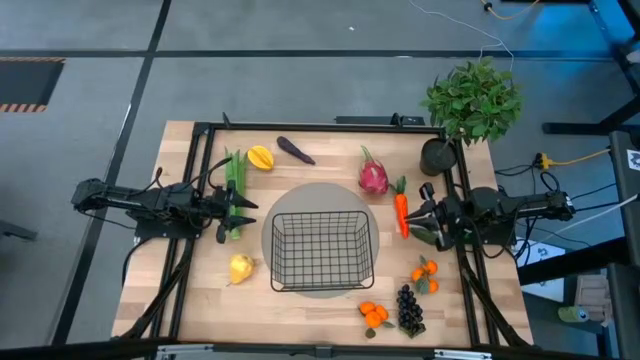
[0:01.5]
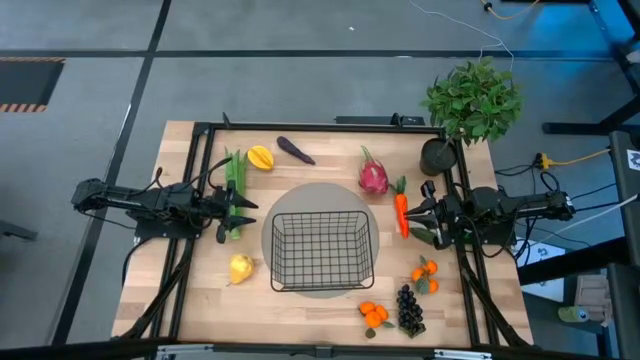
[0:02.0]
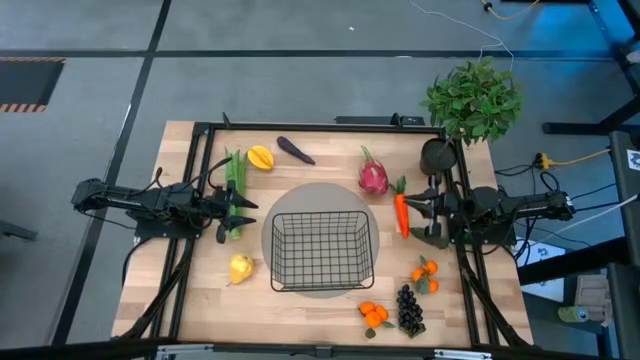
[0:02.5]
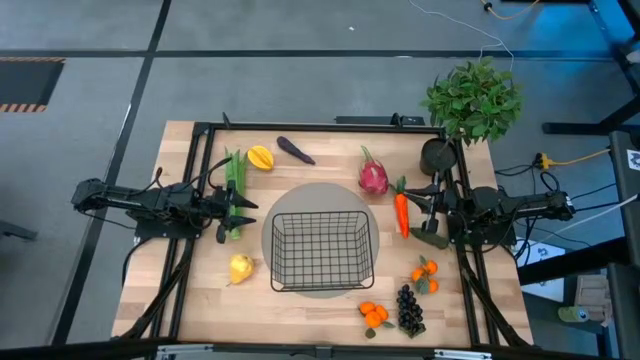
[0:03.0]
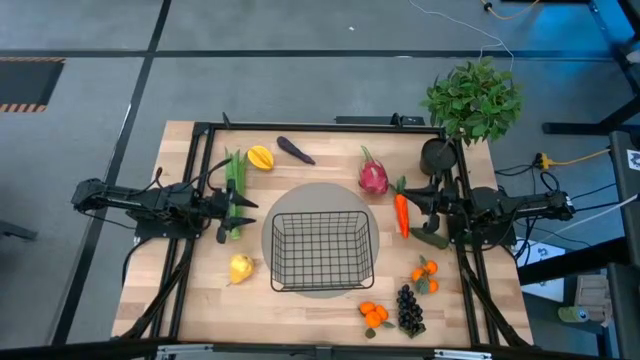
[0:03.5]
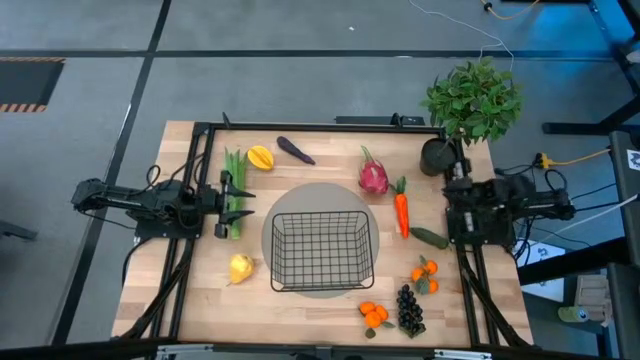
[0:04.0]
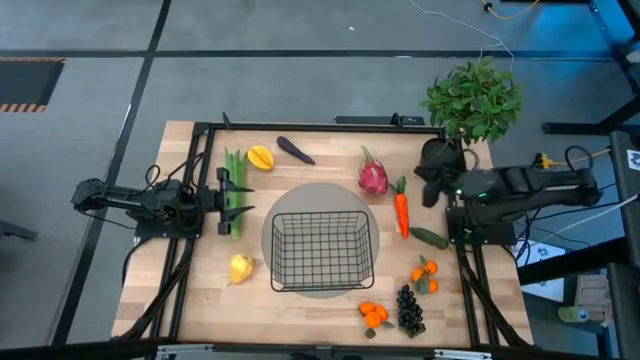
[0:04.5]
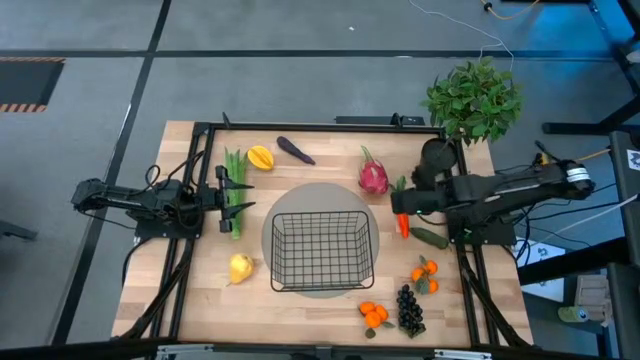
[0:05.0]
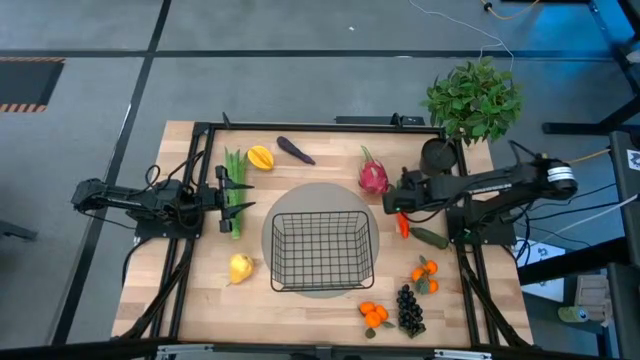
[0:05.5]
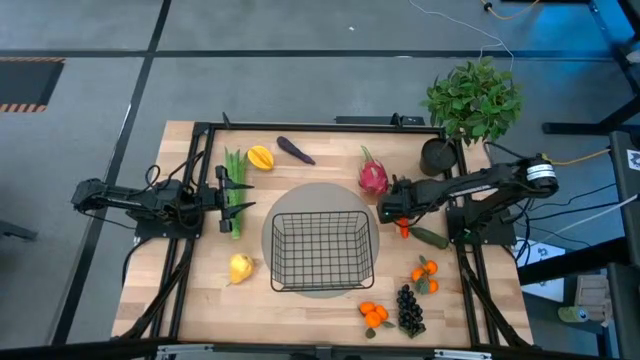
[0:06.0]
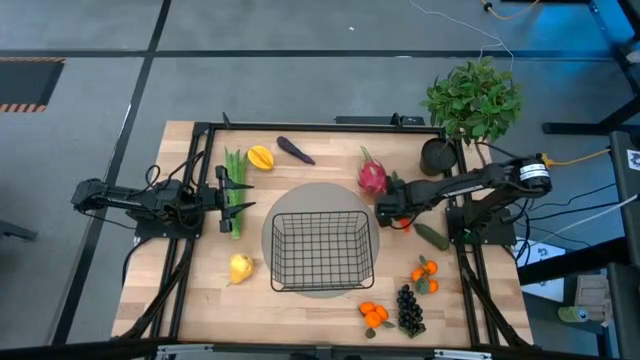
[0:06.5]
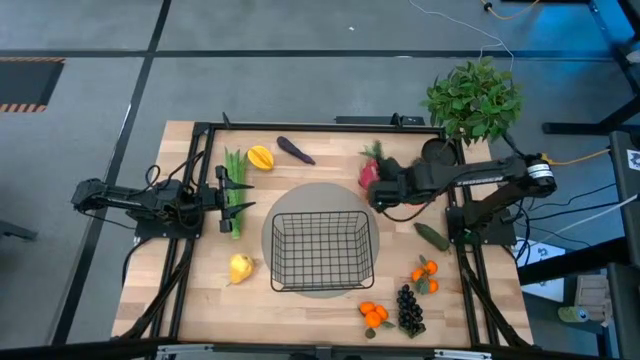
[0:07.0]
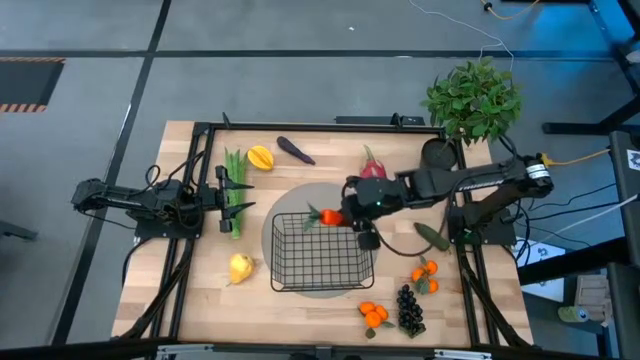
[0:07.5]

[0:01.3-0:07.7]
Task: Build produce basket
Put the carrot into the wire basket

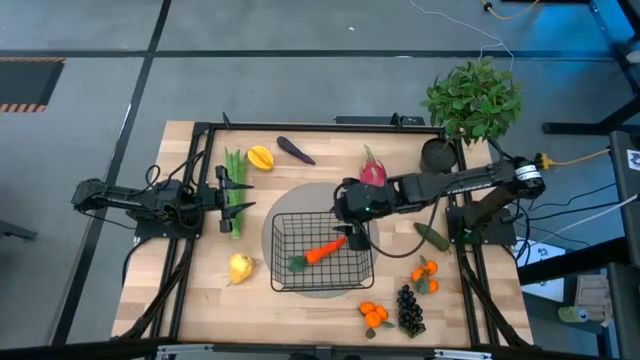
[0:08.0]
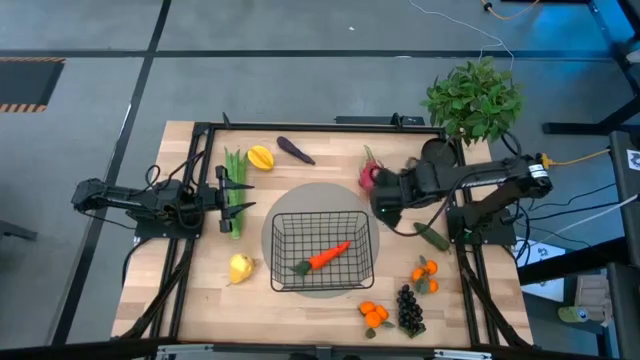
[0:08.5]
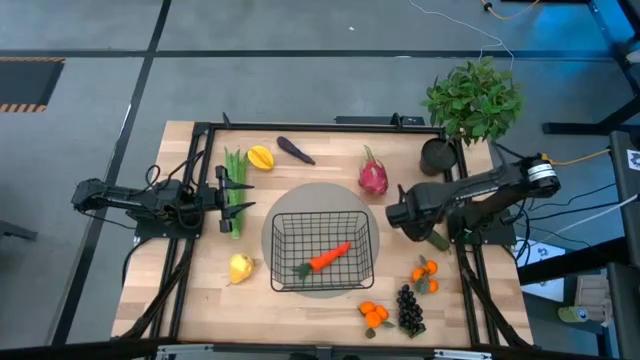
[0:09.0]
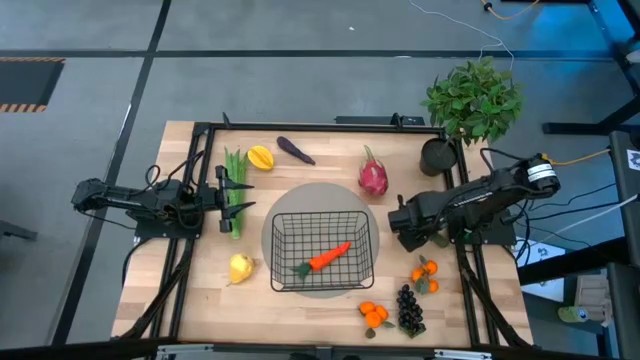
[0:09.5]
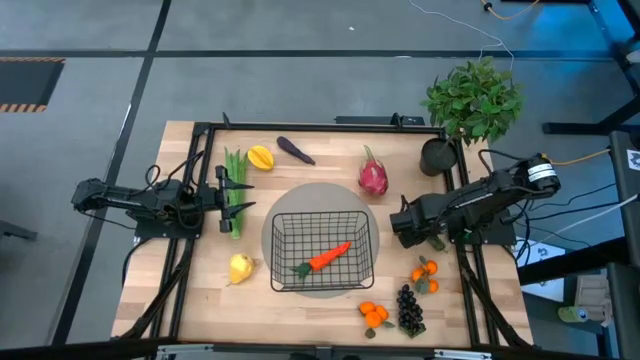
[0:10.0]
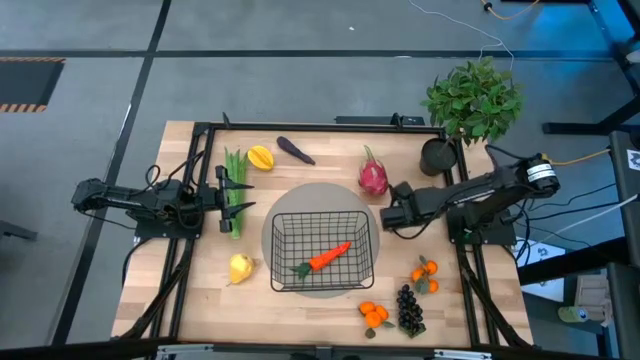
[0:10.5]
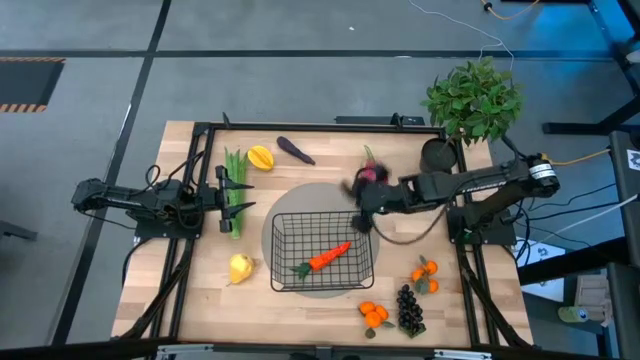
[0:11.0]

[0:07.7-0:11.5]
Put the chili pepper into the wire basket

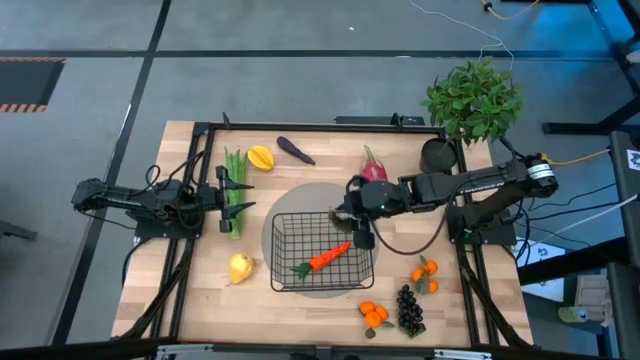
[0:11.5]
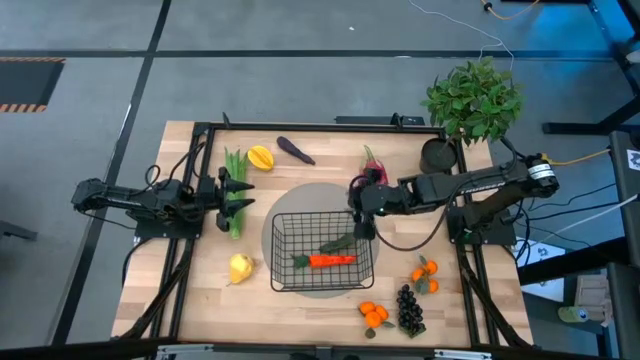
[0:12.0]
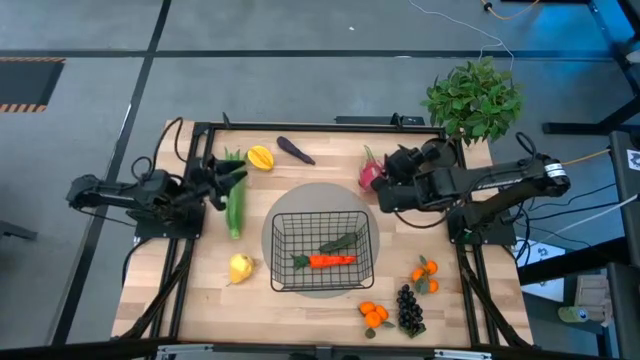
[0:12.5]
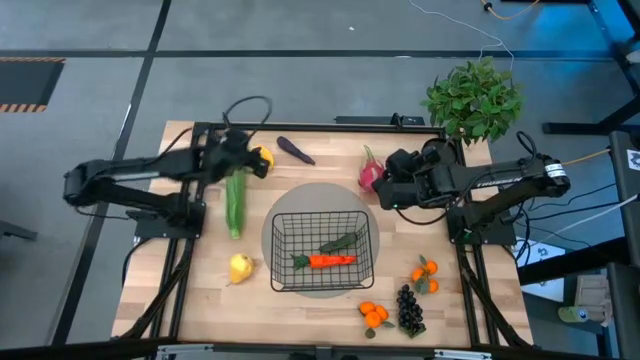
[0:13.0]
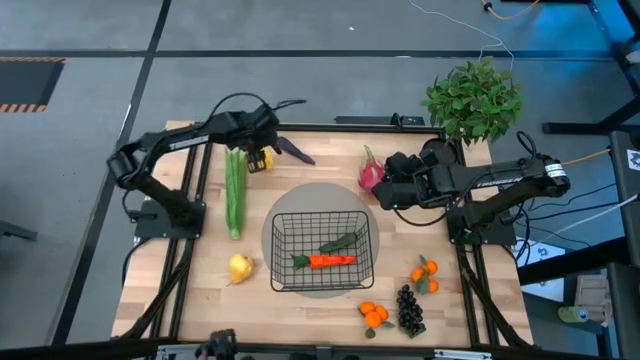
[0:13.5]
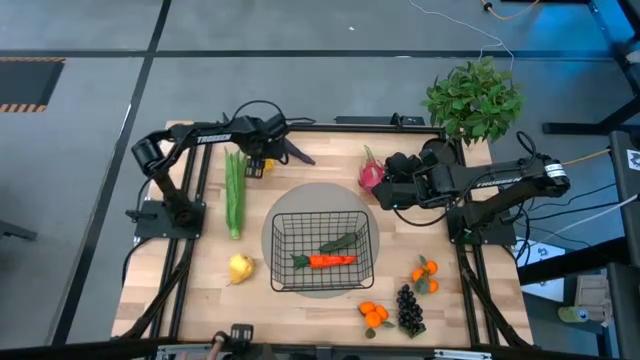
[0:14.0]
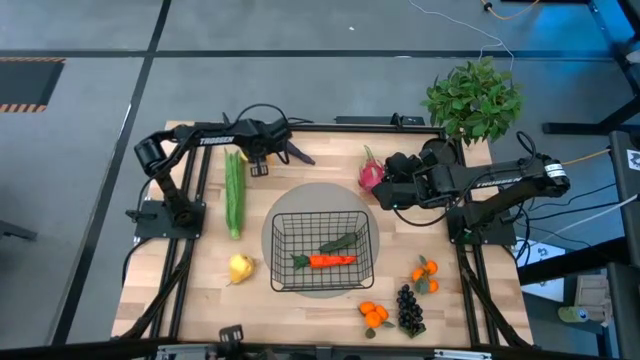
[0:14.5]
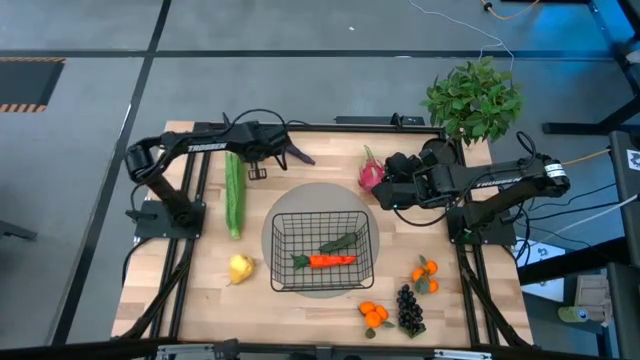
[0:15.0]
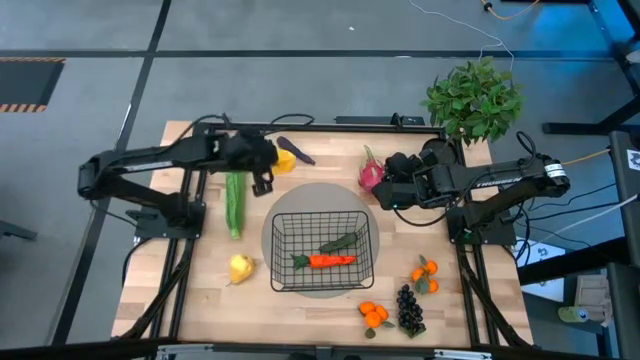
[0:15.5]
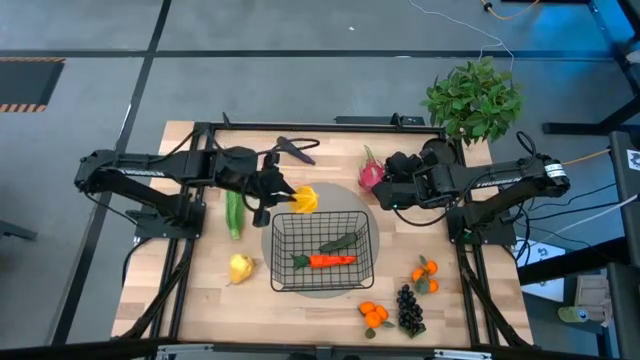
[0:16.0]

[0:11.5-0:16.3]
Put the starfruit into the wire basket

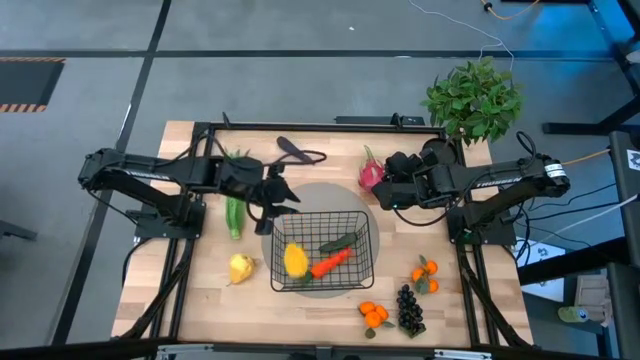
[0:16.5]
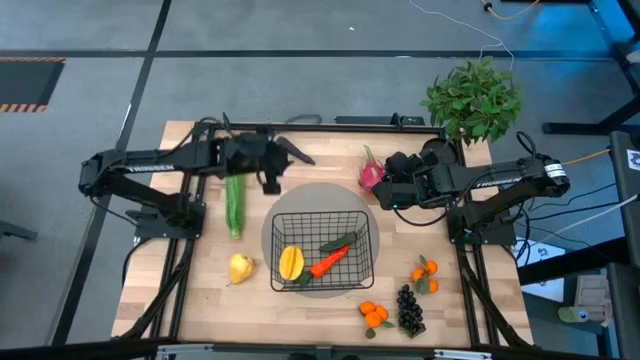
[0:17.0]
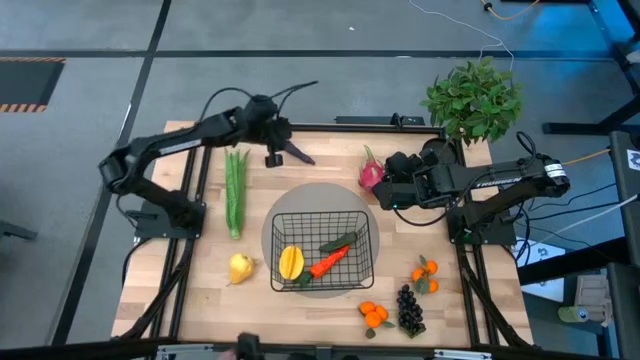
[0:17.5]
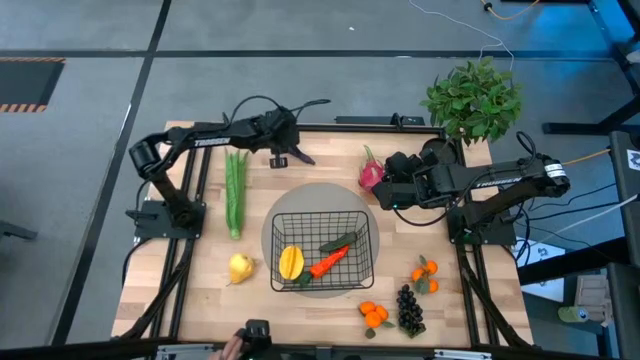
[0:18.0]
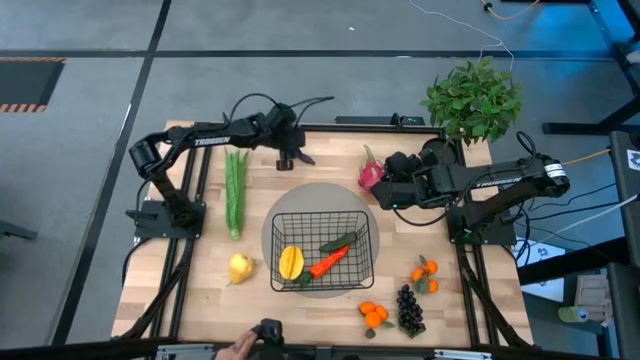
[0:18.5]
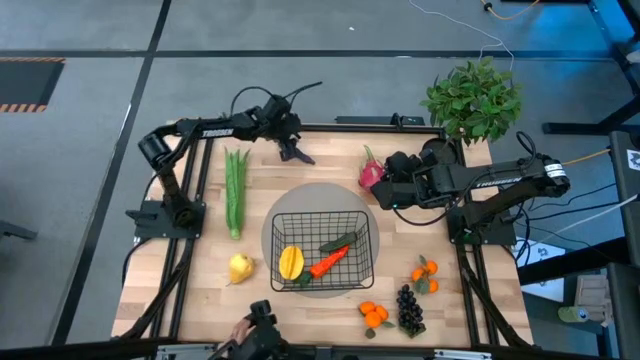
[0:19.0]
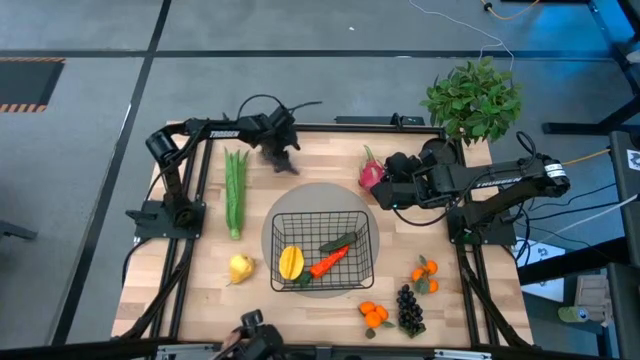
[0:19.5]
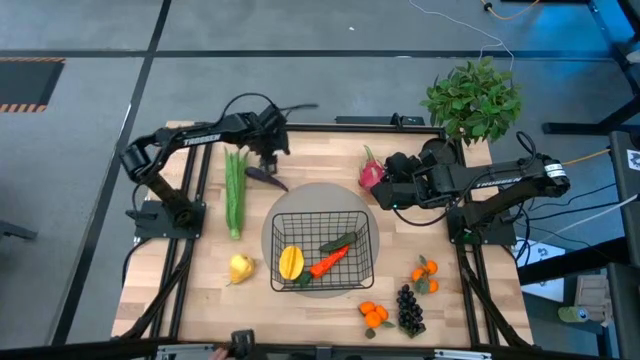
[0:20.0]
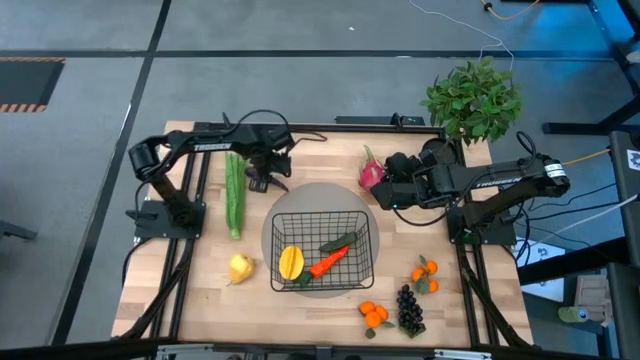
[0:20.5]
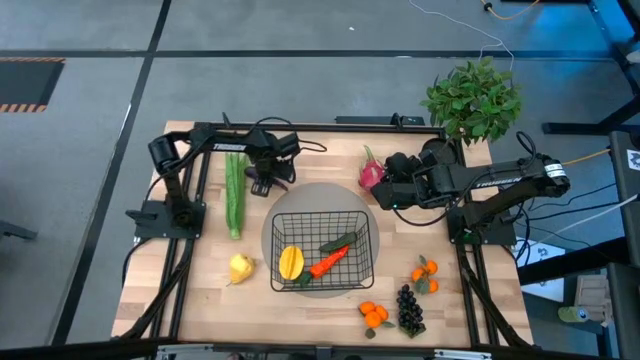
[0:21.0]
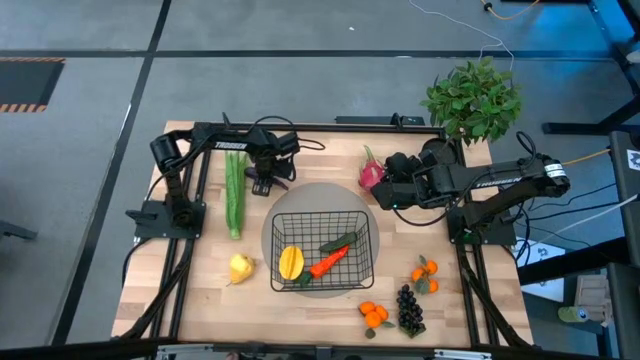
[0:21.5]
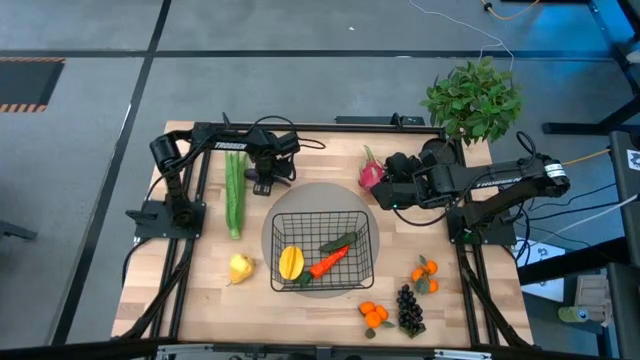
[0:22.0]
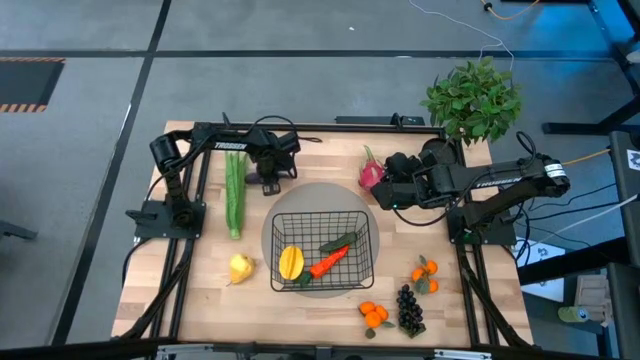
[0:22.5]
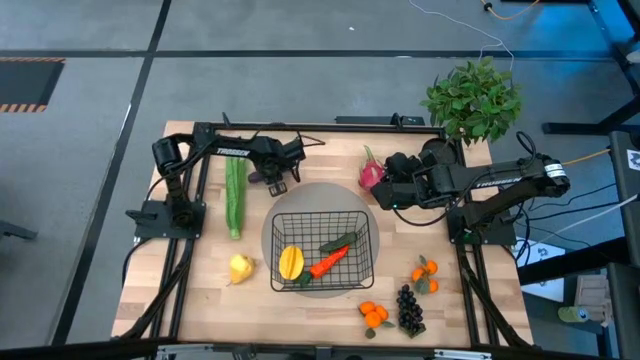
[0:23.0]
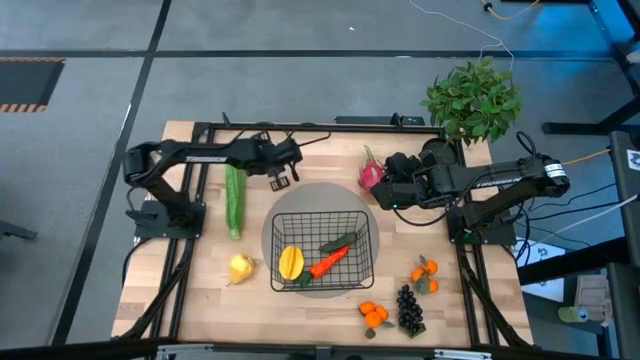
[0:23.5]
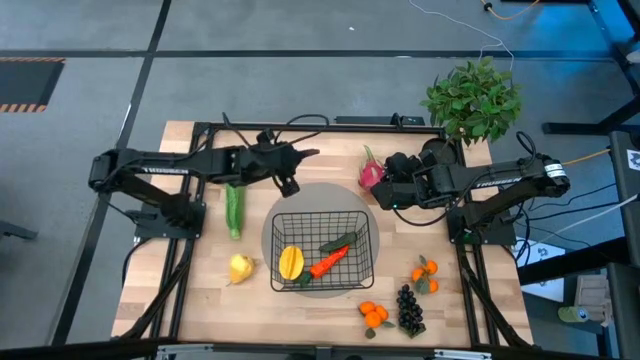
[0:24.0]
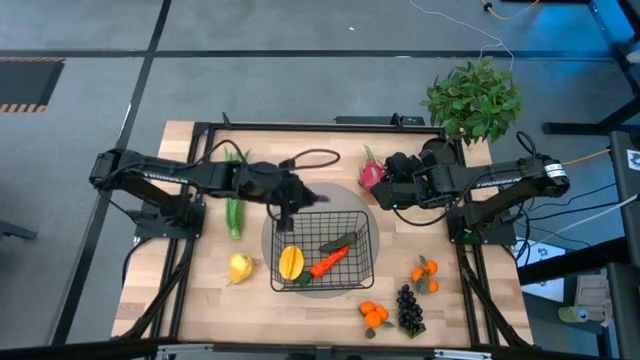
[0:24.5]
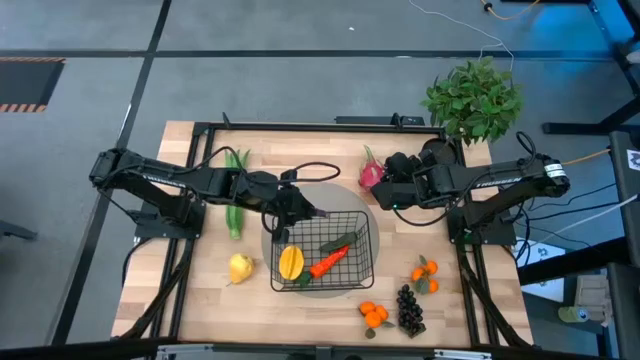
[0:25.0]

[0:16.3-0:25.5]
Put the eggplant into the wire basket
